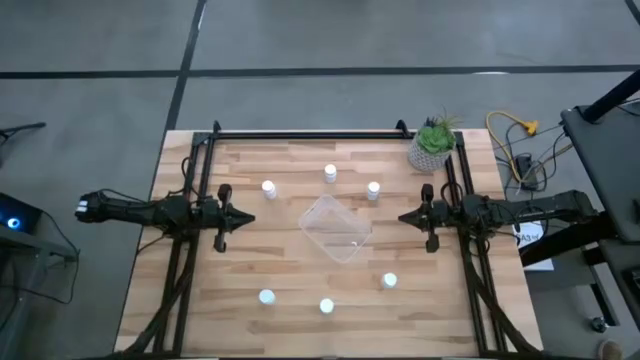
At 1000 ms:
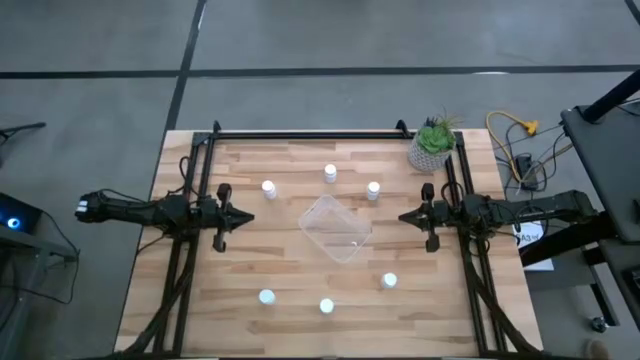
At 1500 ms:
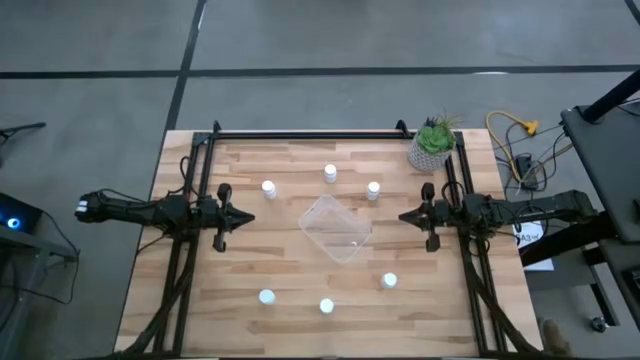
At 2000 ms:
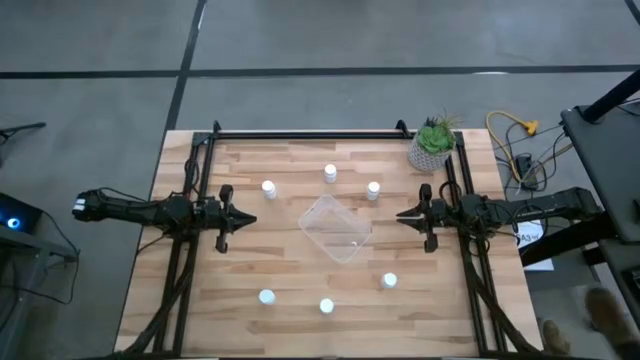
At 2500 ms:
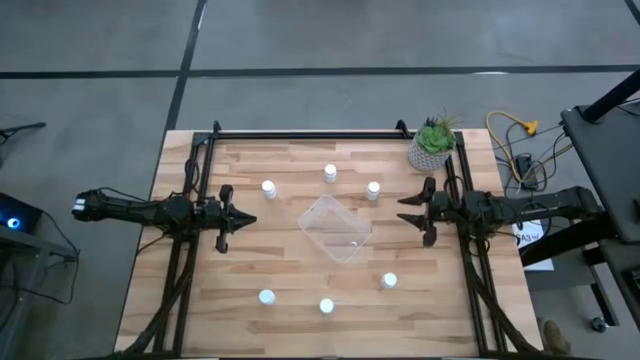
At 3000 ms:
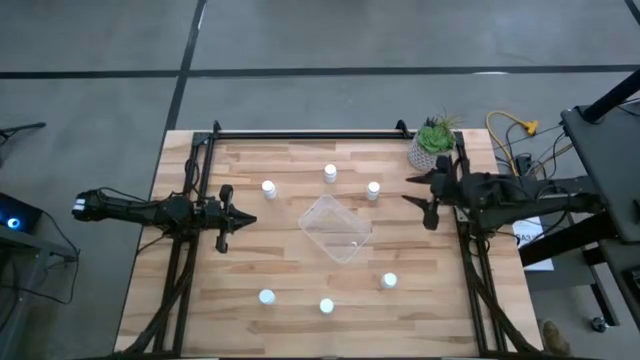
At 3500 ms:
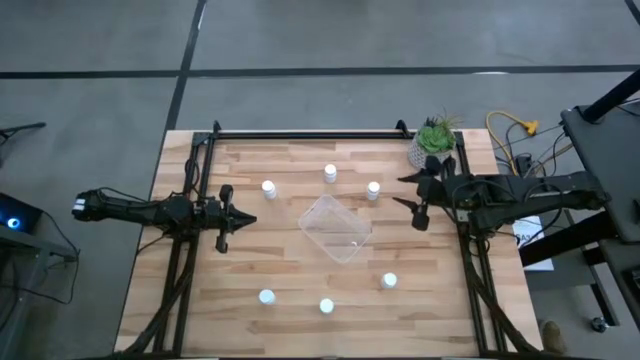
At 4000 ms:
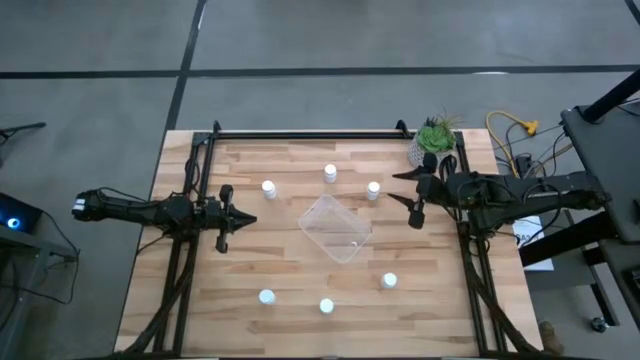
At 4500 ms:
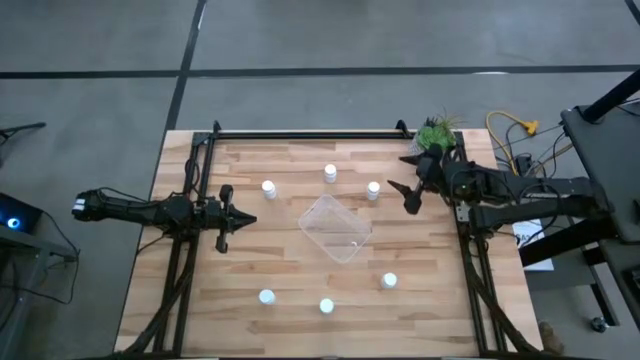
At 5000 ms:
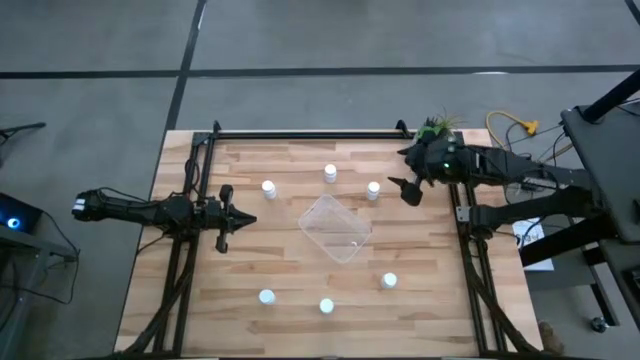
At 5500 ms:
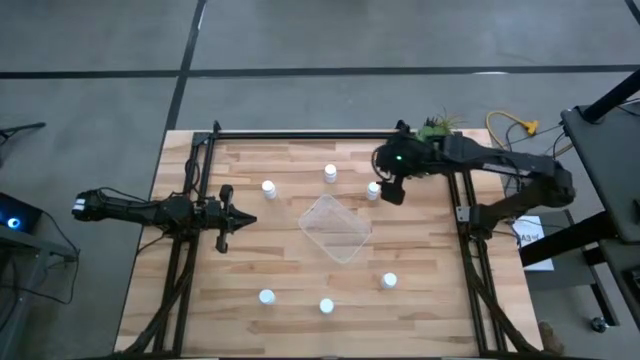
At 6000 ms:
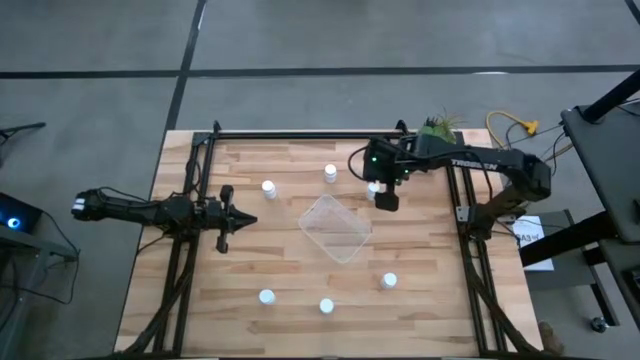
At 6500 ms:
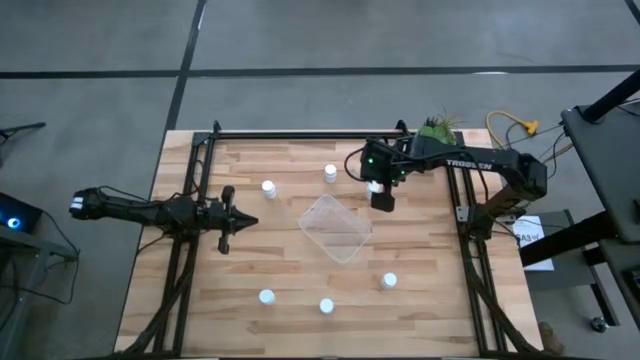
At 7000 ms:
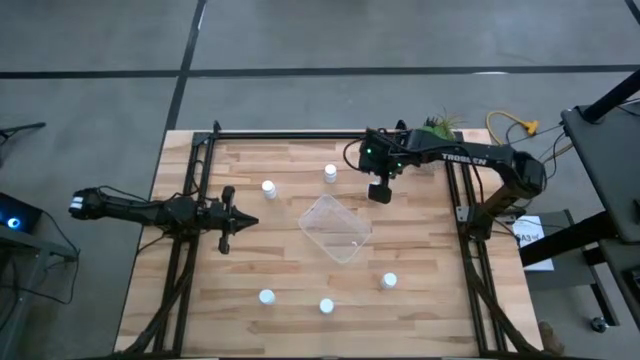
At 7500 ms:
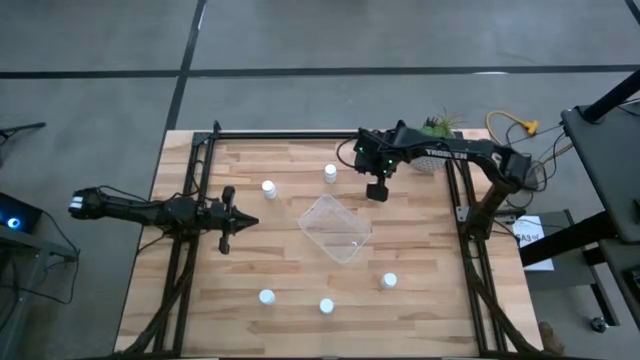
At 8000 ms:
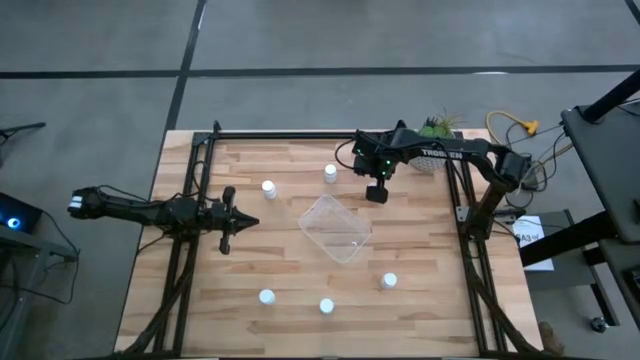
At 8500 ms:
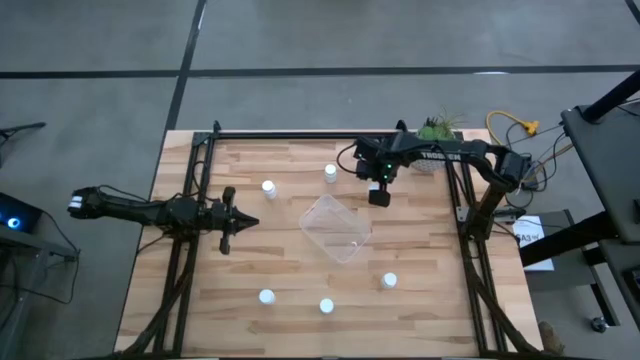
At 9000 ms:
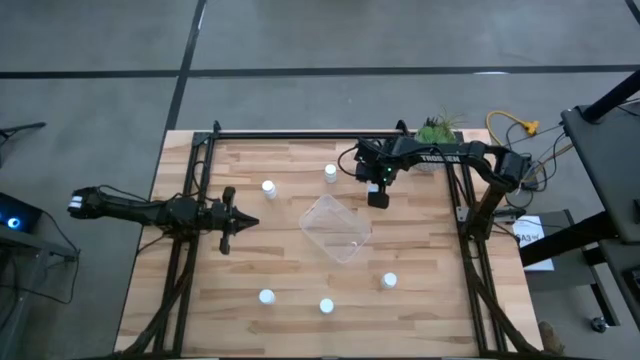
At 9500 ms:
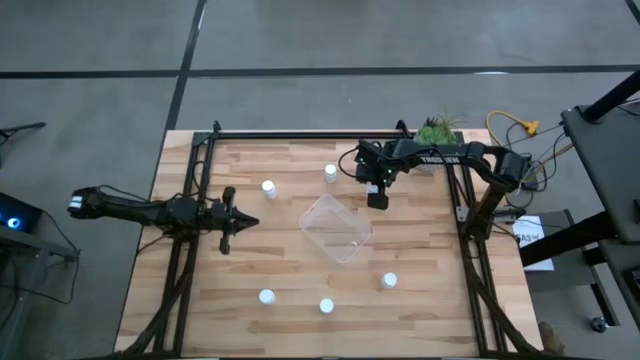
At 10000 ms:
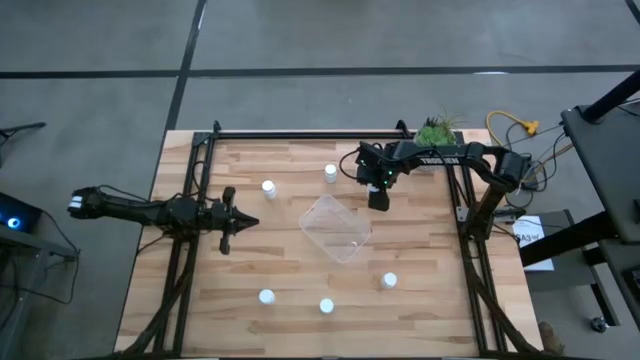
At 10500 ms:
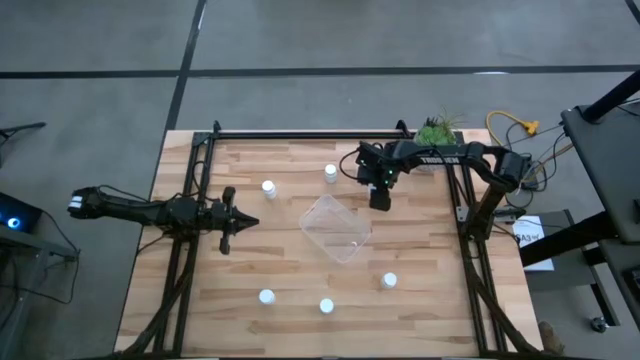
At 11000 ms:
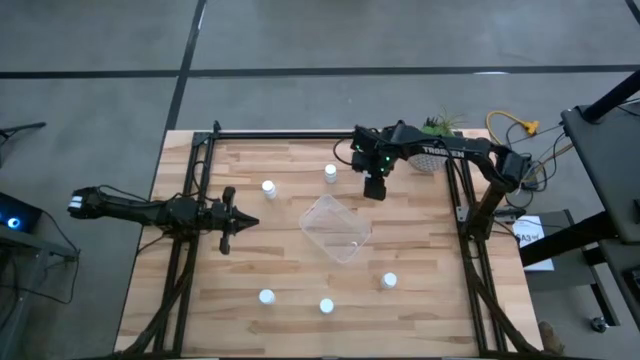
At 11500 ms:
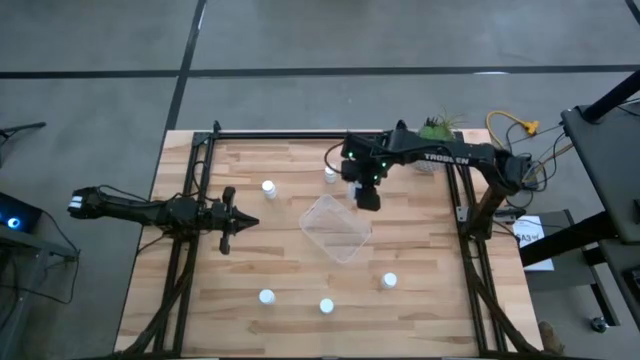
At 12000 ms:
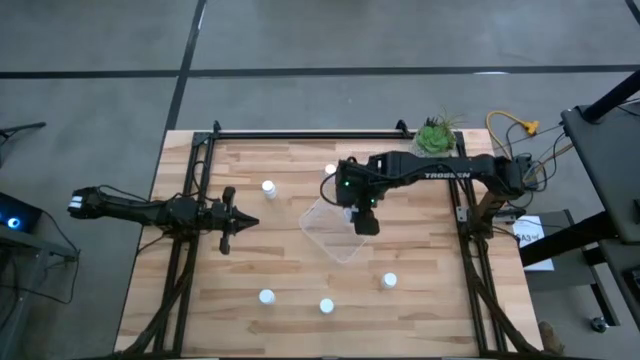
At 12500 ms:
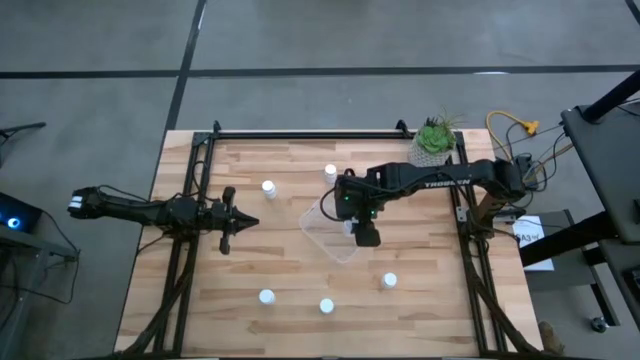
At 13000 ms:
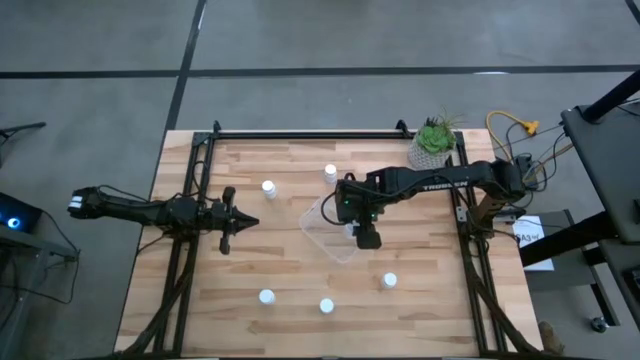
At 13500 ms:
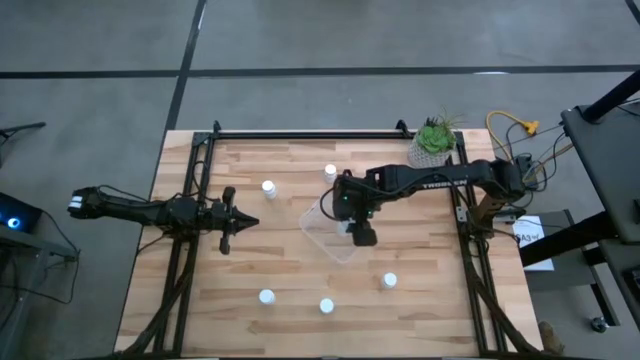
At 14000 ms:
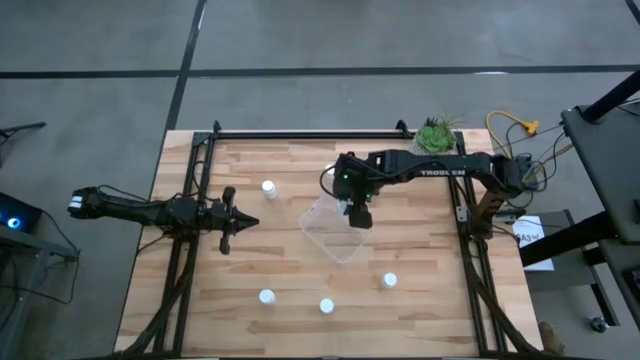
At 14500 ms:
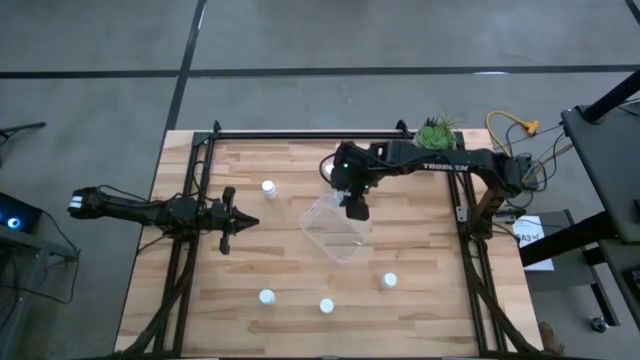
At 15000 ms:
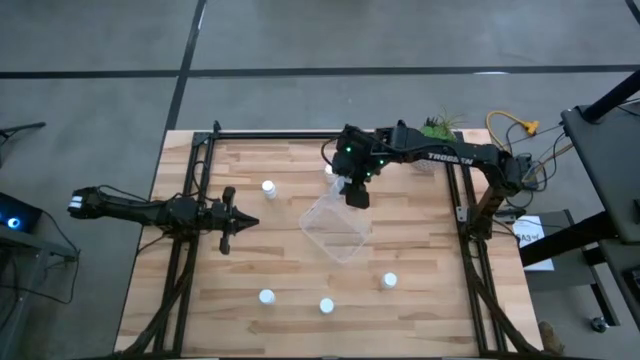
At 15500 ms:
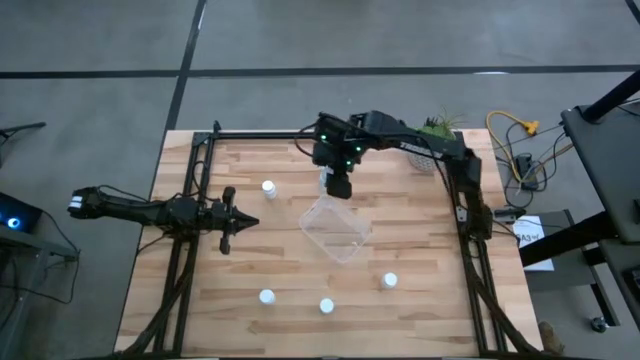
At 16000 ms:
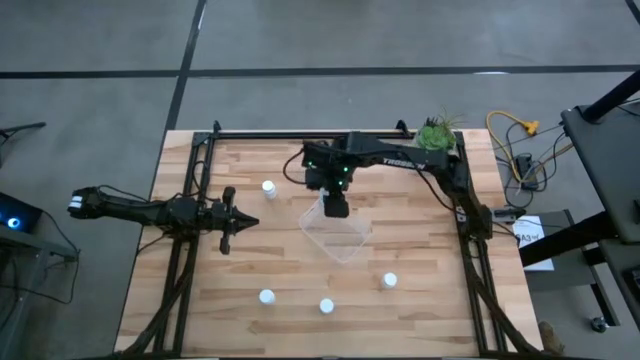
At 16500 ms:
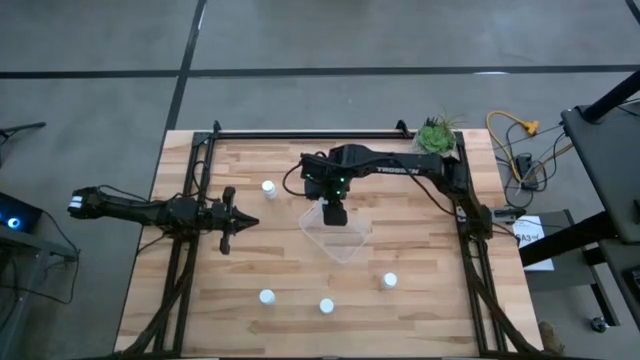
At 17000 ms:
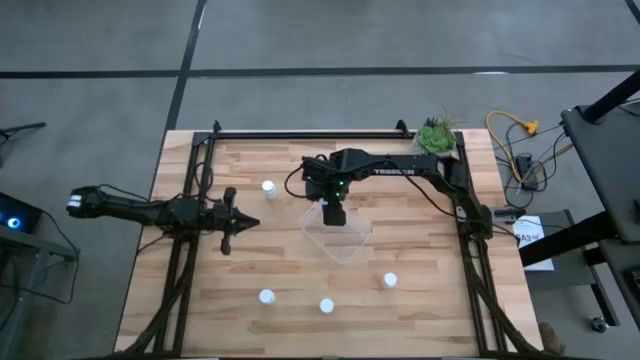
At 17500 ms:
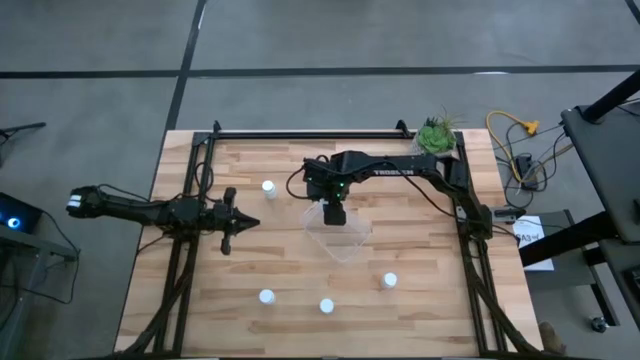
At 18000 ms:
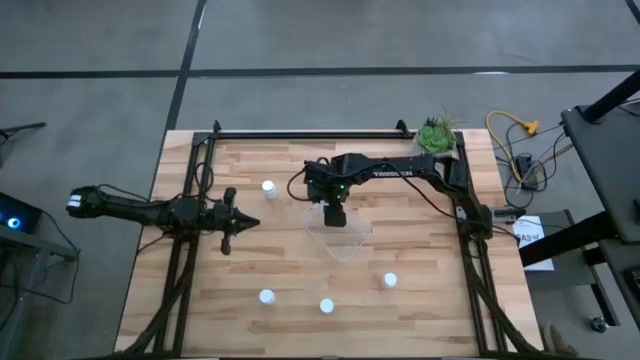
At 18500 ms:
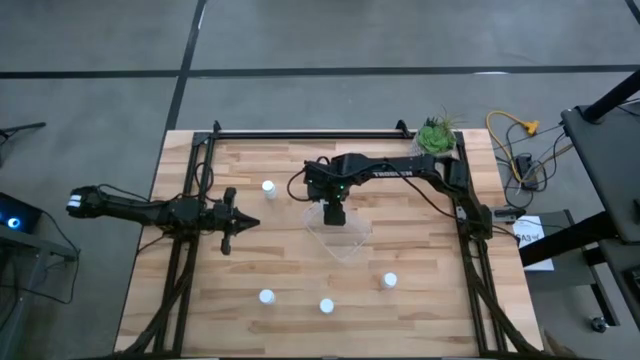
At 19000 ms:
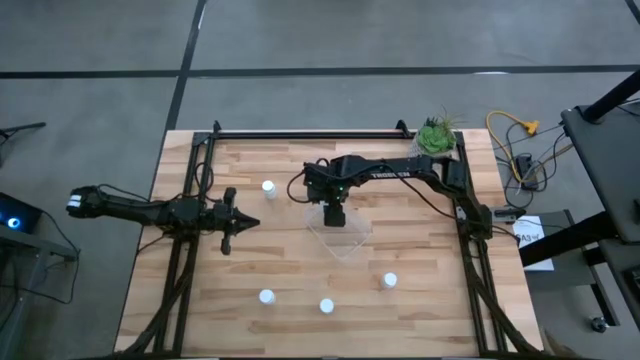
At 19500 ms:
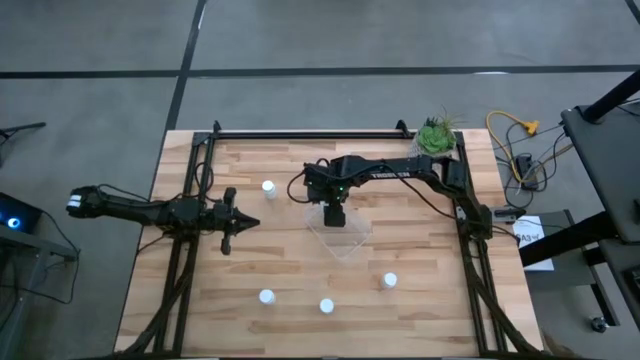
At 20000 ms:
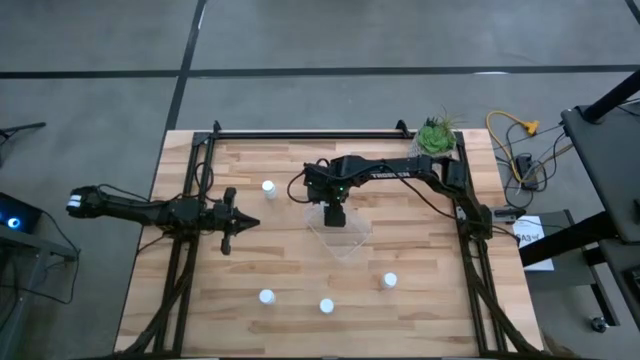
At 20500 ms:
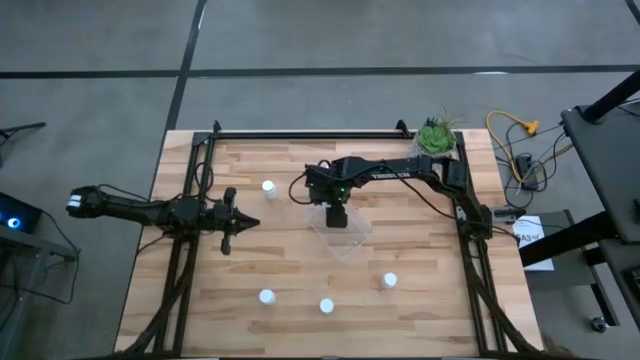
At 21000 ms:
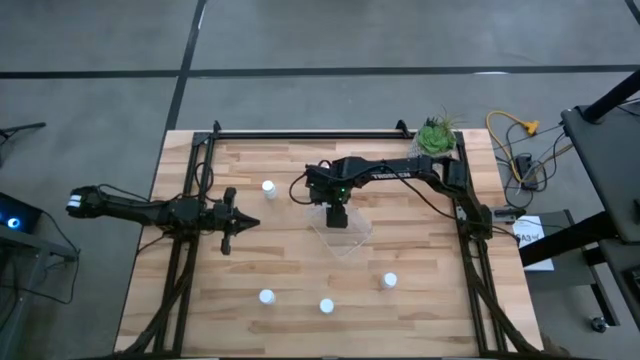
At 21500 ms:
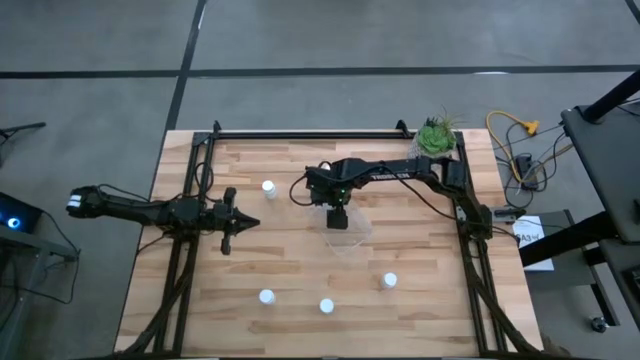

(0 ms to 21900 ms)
Task: Pick and place pill bottles into a basket
Put the white pill bottle into the transparent bin
